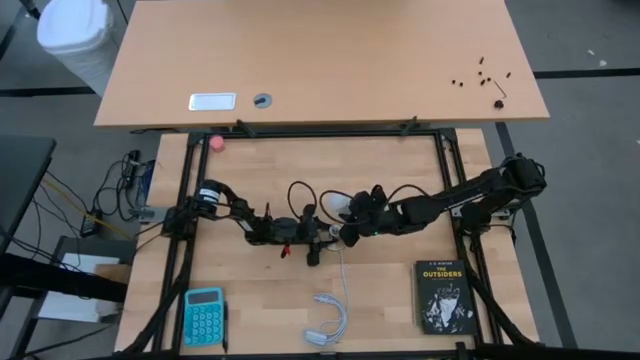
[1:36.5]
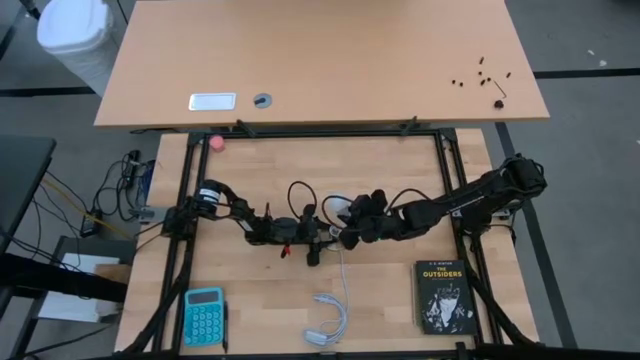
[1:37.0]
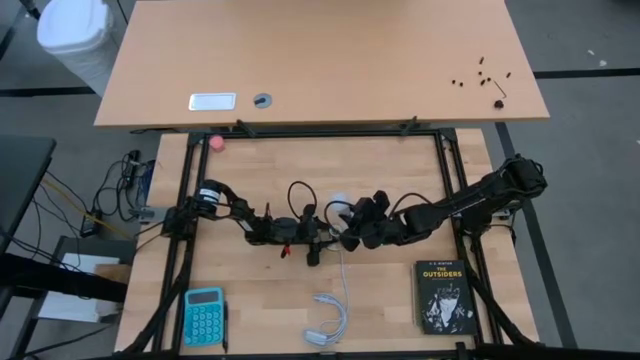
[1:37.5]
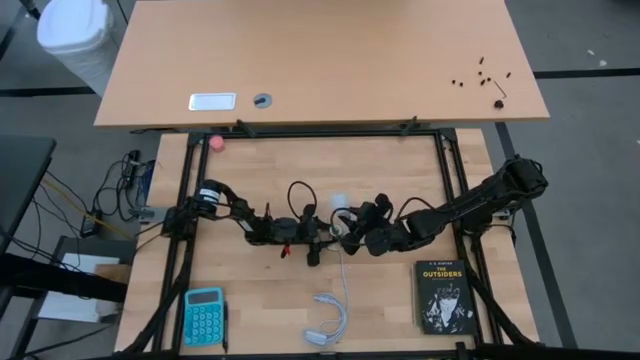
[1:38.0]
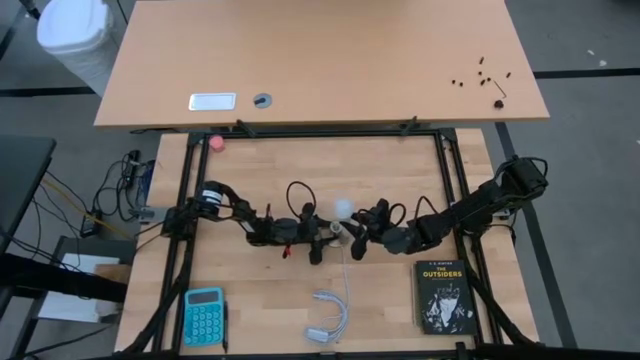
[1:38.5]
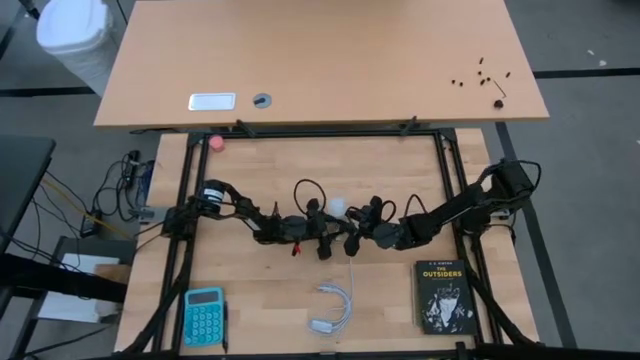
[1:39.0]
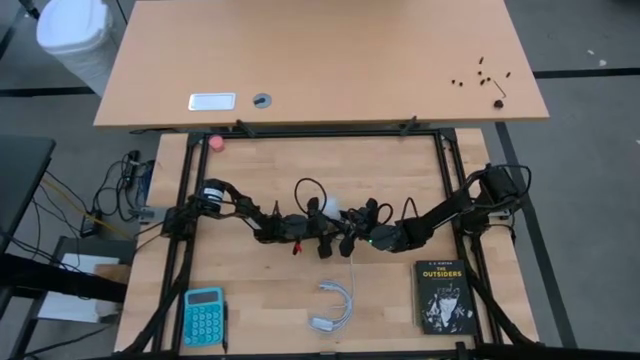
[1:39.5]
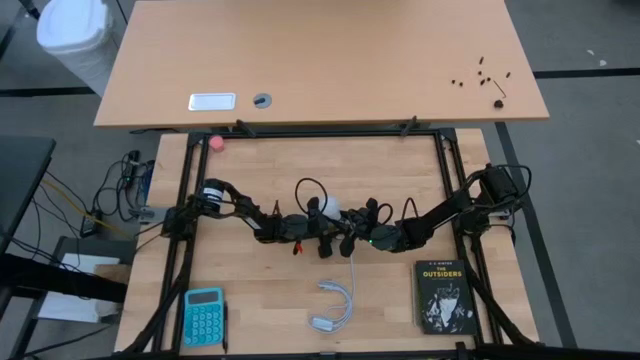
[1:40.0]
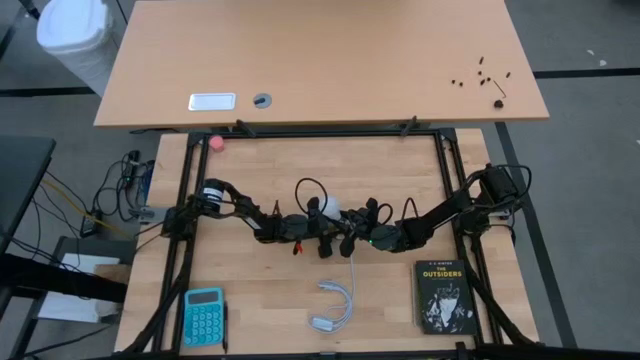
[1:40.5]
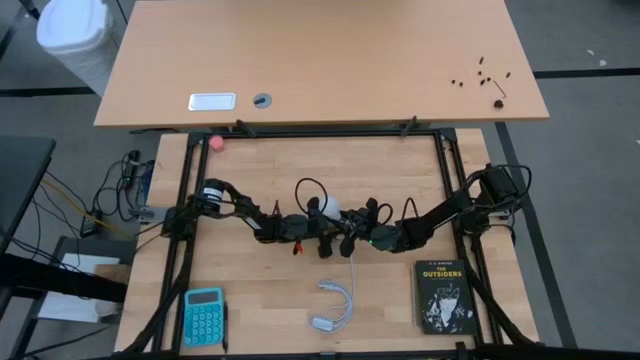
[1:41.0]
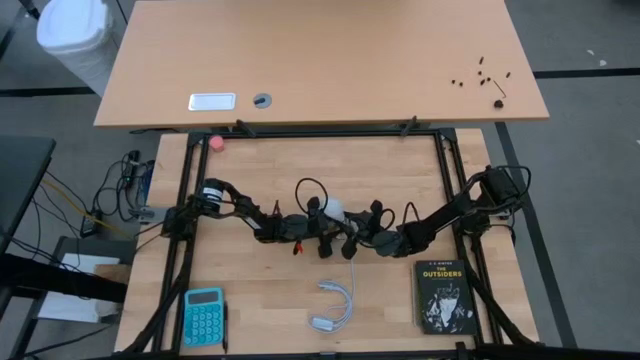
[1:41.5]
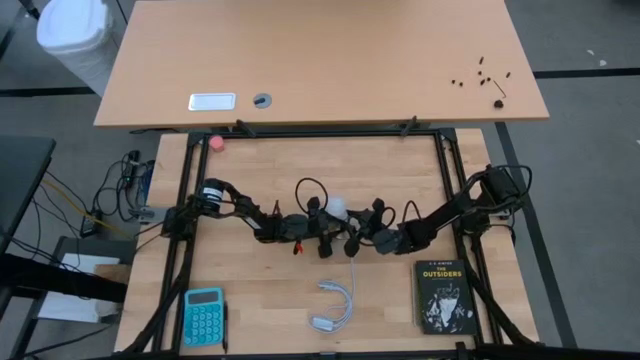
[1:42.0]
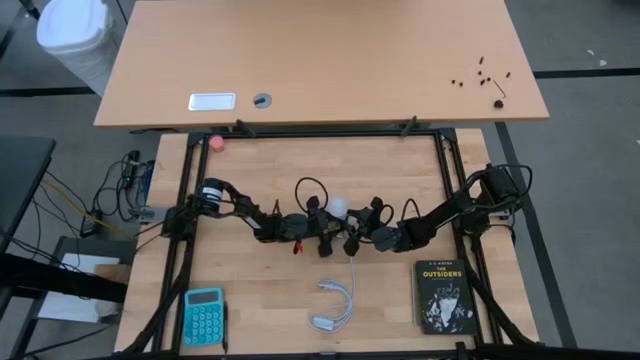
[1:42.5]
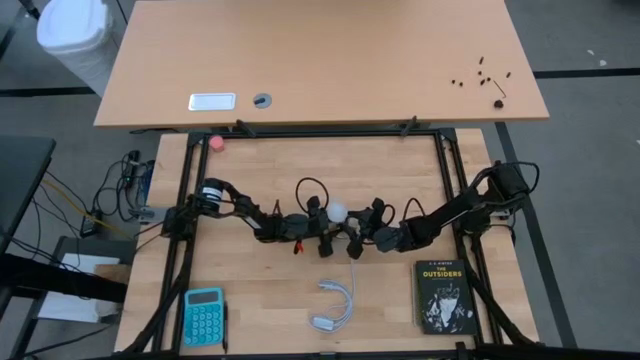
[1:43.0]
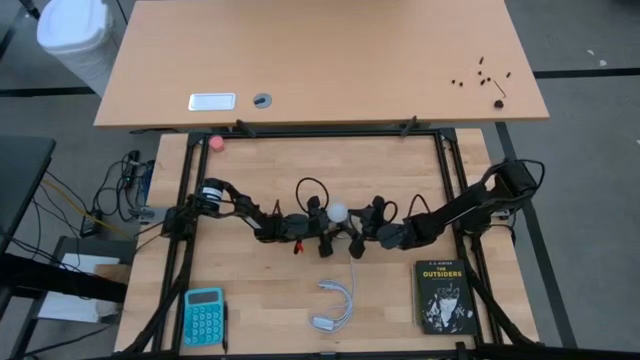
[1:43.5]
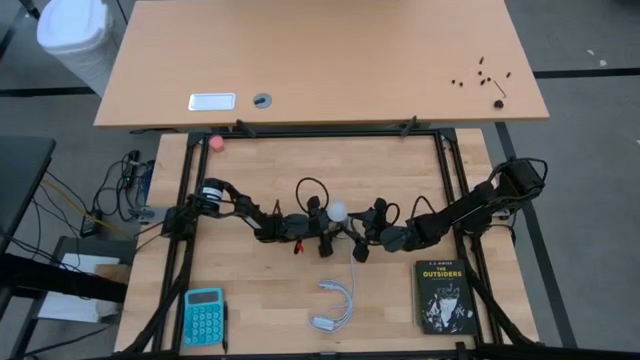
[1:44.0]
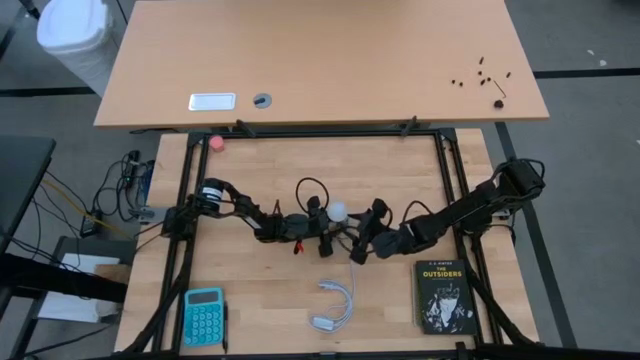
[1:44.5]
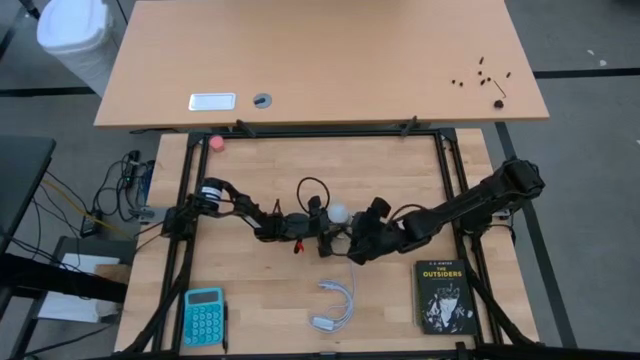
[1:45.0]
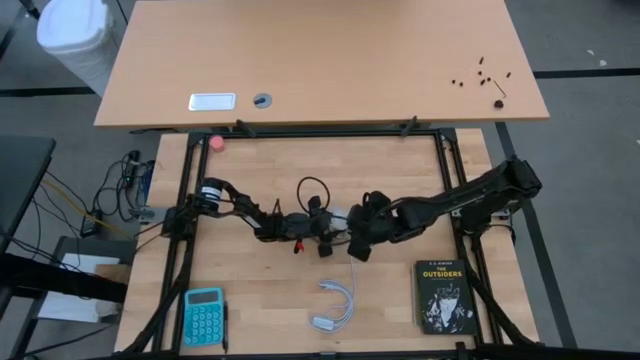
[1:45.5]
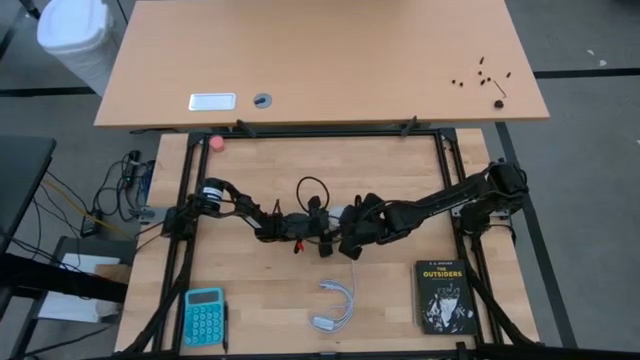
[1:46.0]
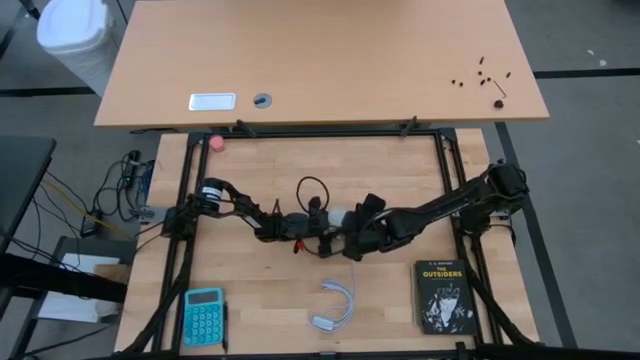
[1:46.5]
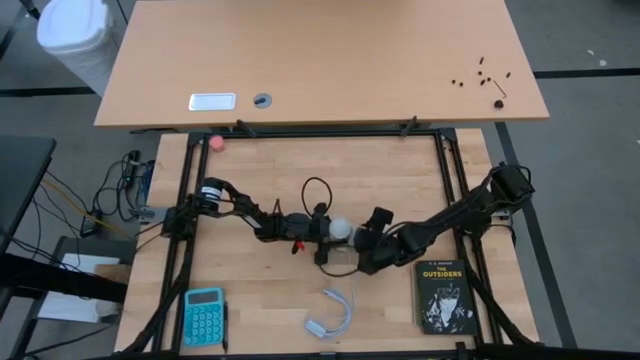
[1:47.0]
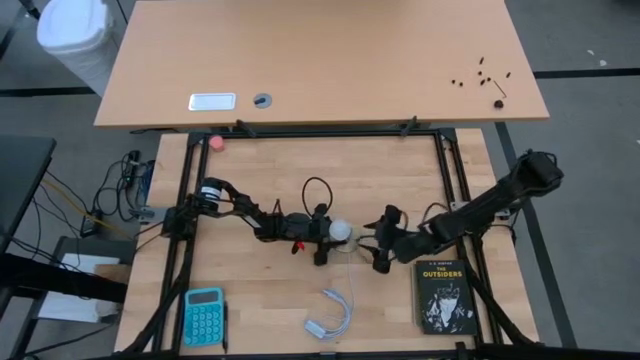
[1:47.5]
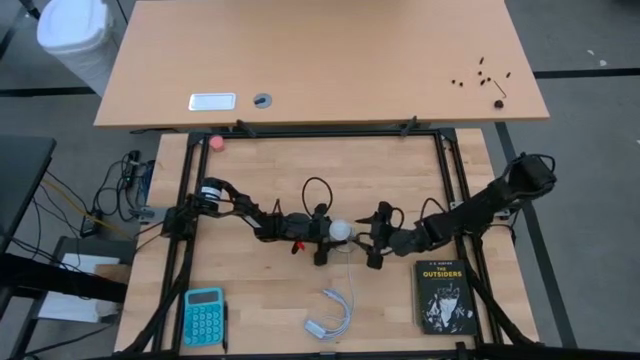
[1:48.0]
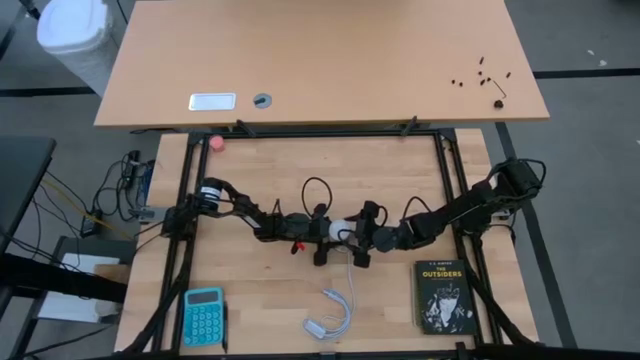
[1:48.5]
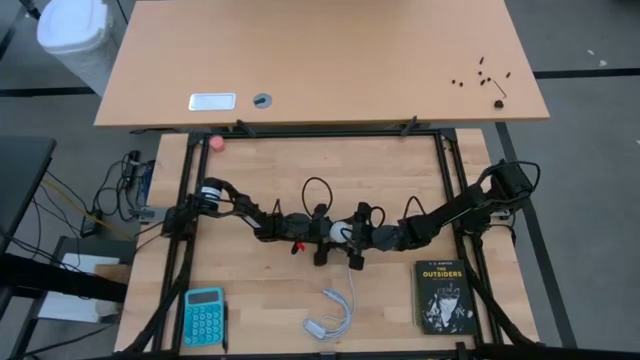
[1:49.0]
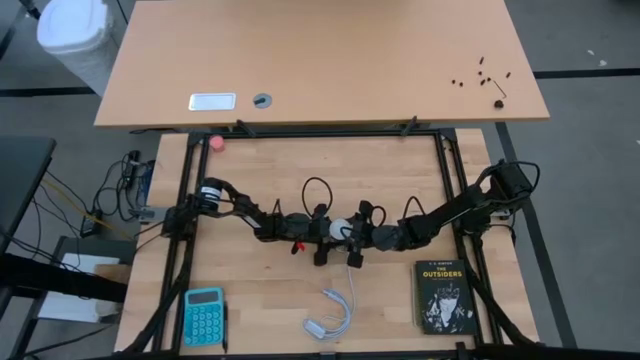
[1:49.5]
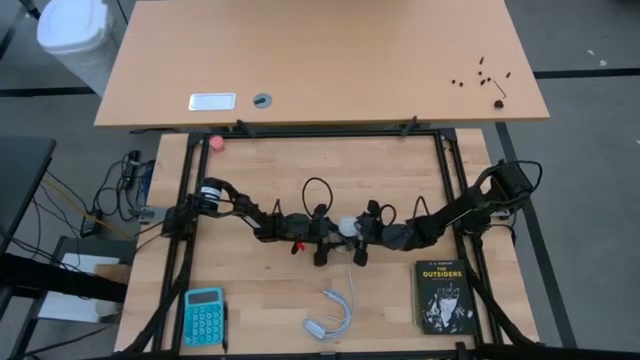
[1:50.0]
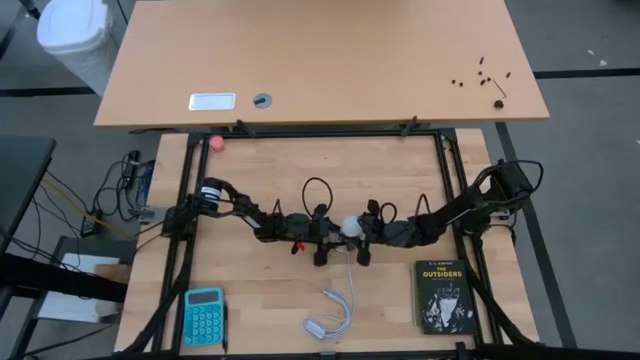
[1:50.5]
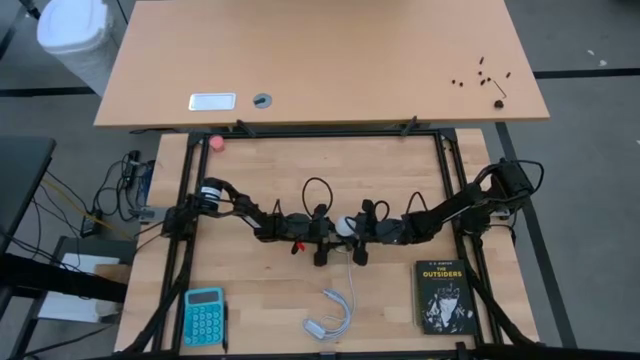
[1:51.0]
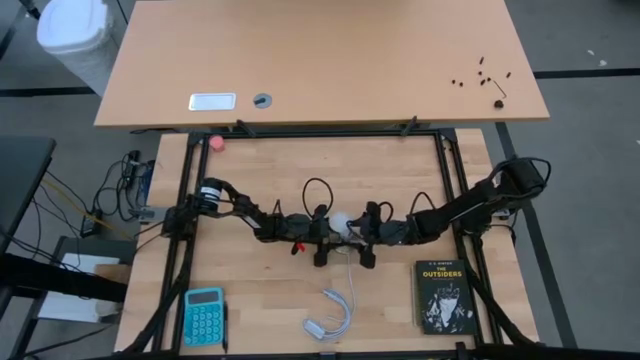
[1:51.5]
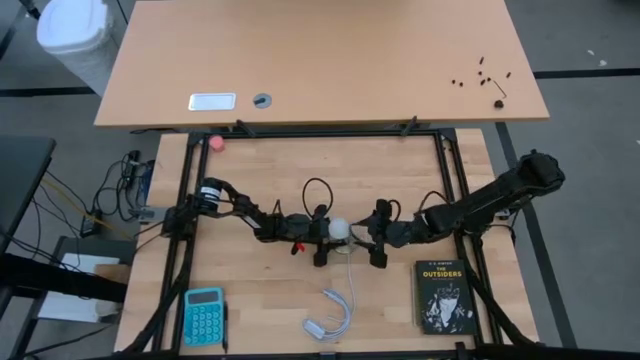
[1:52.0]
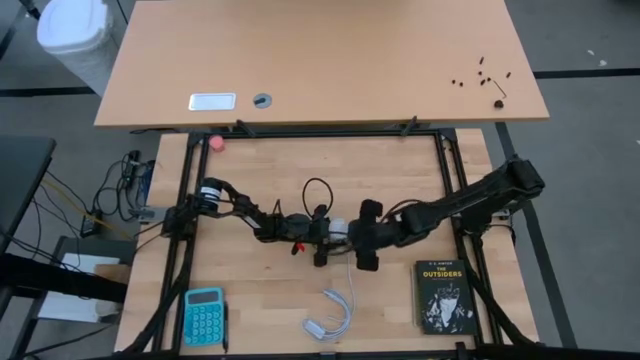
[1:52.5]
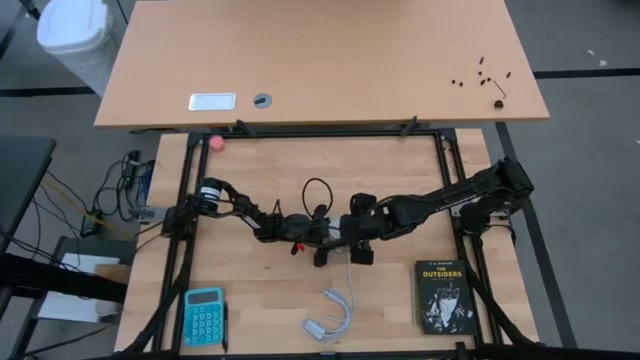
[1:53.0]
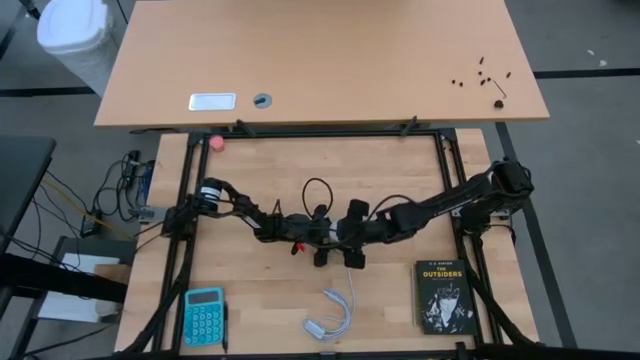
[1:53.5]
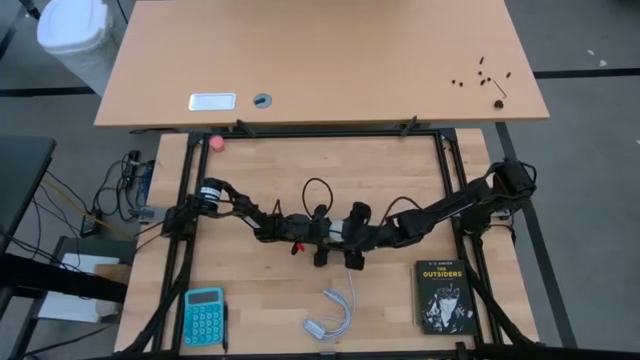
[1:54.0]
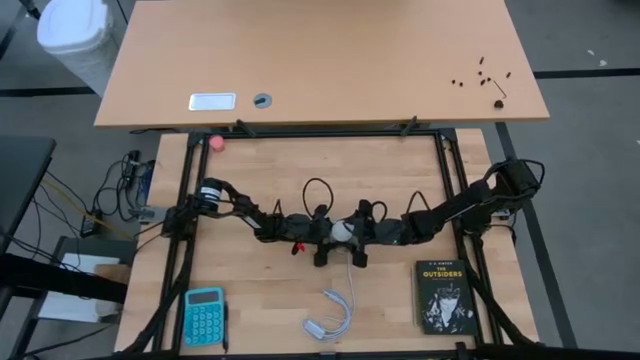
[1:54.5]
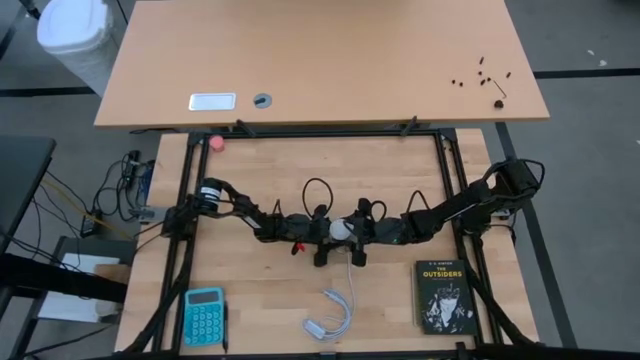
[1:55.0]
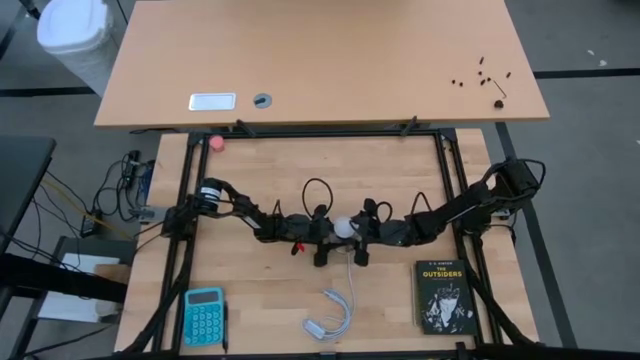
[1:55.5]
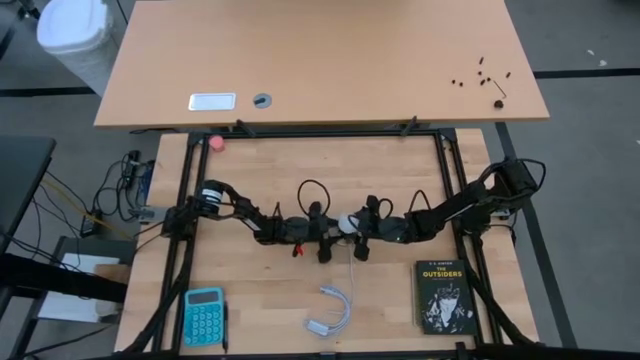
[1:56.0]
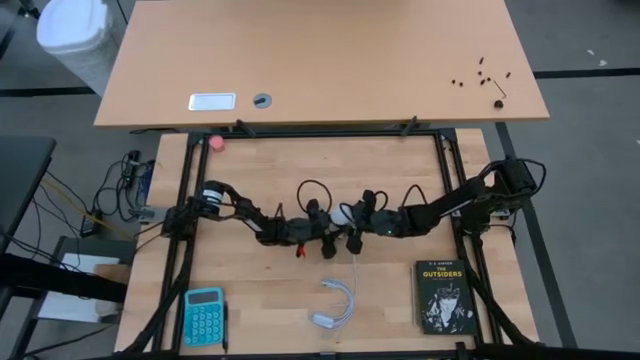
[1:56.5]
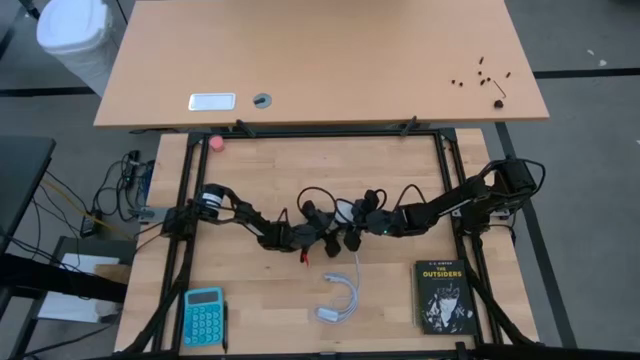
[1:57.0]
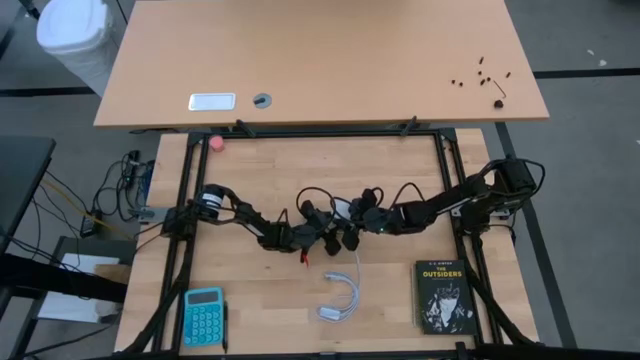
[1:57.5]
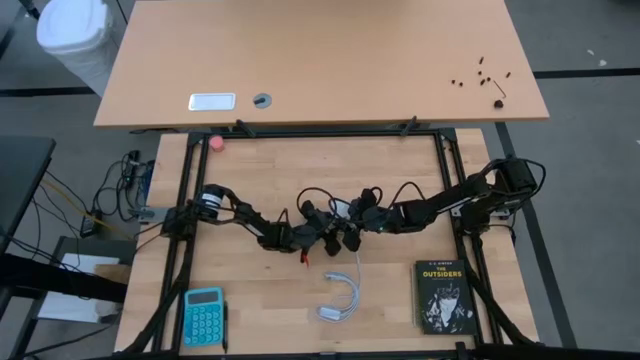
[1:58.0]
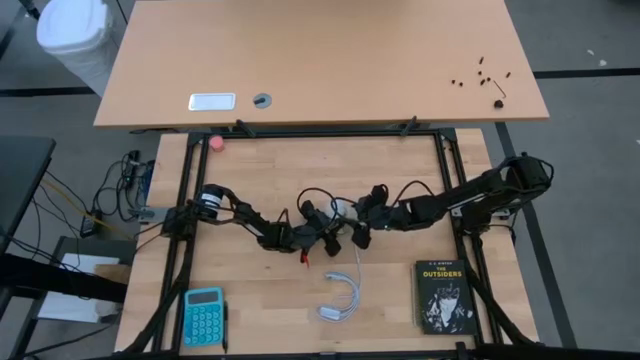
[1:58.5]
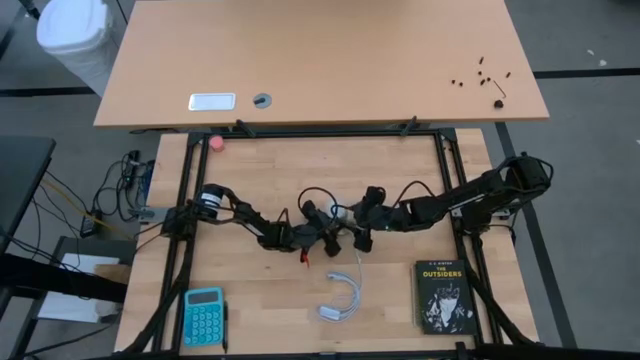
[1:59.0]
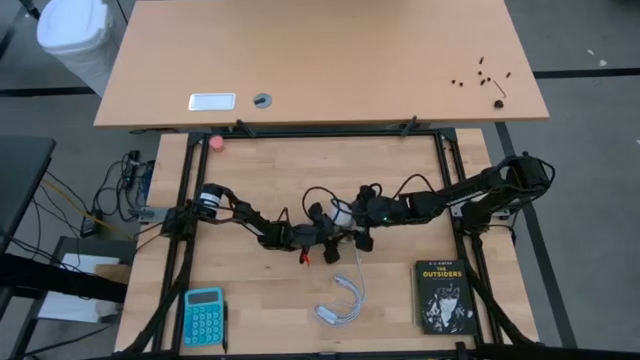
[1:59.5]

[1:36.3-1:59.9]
Task: Screw lightbulb
Insert the white lightbulb into the silver lamp
